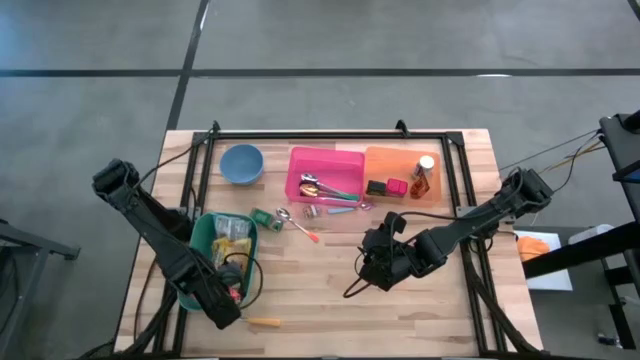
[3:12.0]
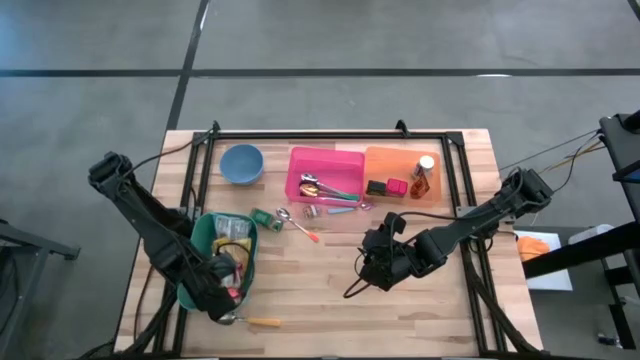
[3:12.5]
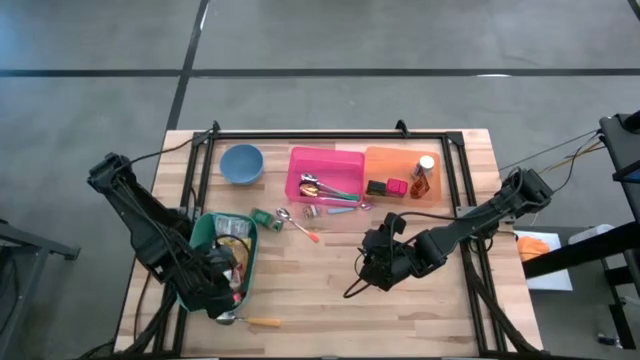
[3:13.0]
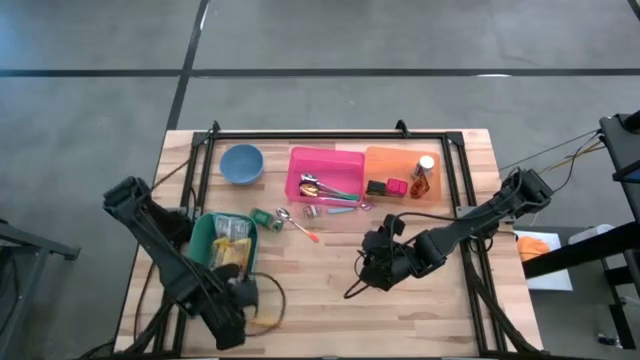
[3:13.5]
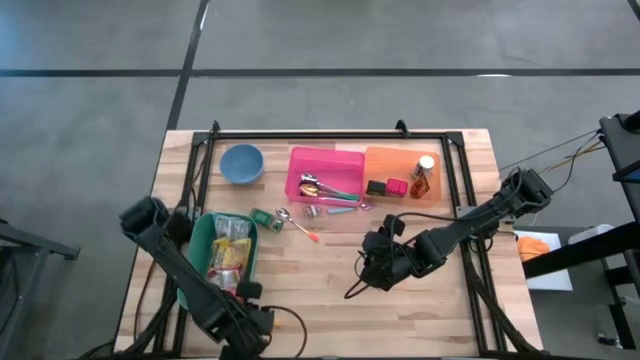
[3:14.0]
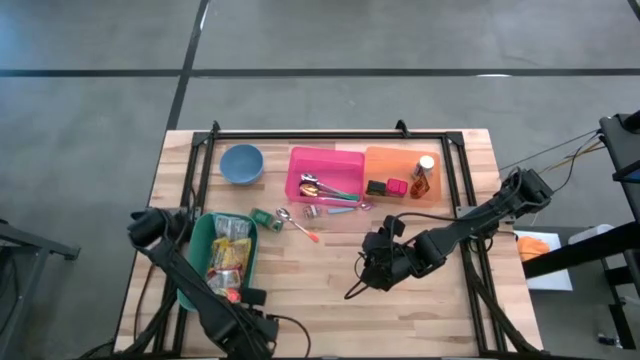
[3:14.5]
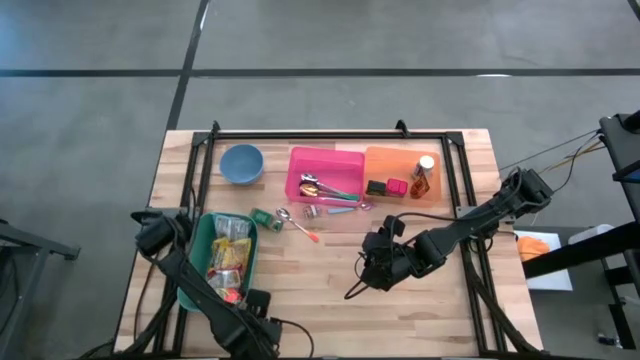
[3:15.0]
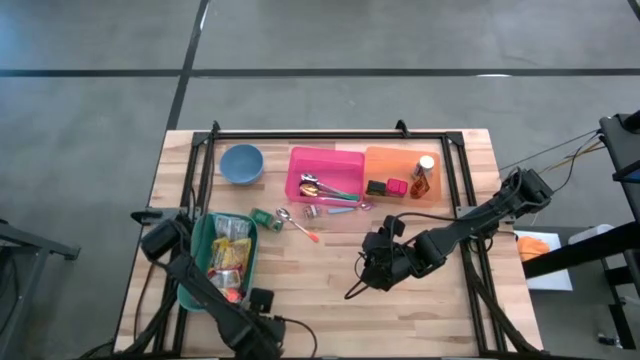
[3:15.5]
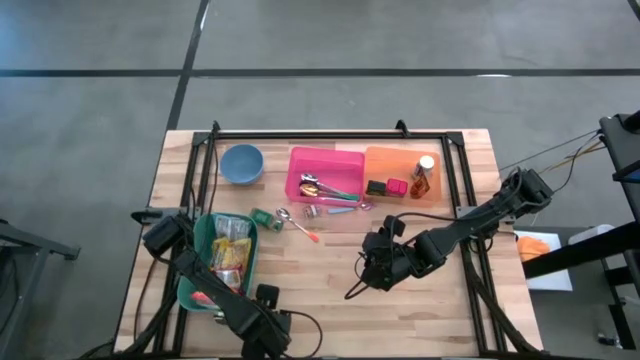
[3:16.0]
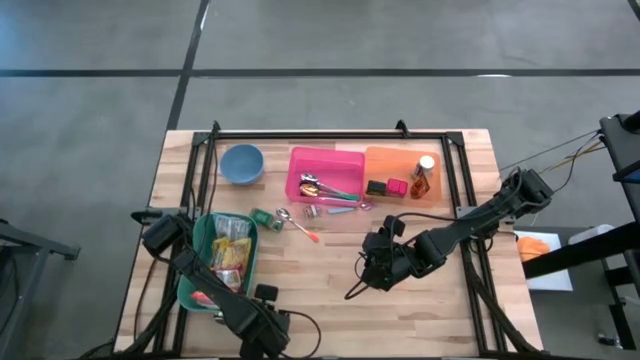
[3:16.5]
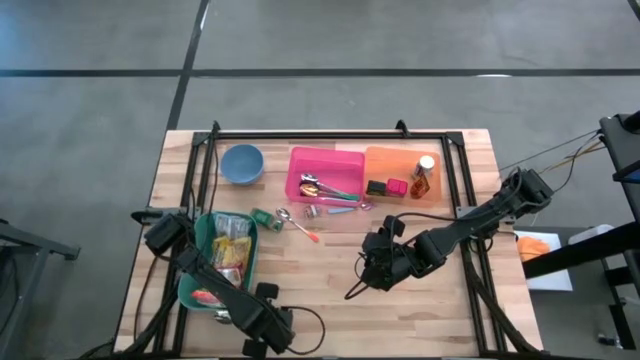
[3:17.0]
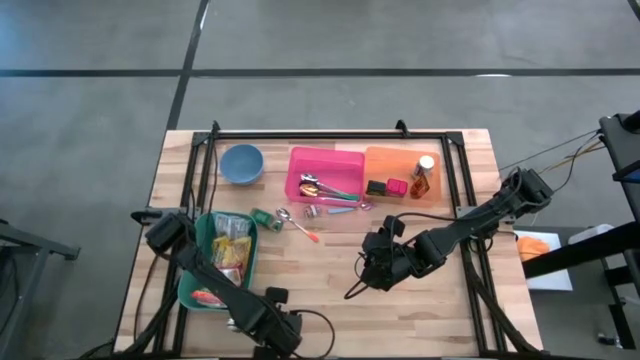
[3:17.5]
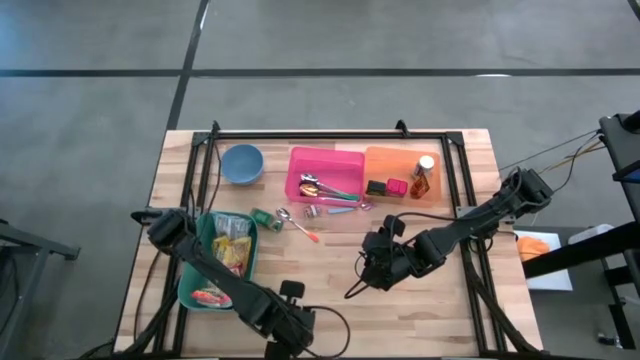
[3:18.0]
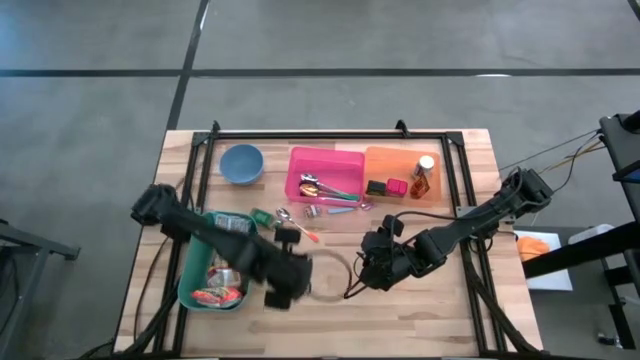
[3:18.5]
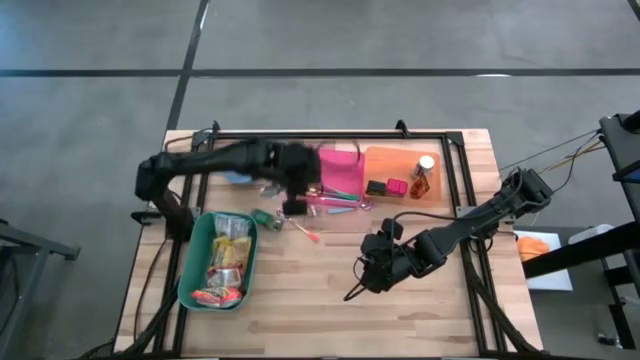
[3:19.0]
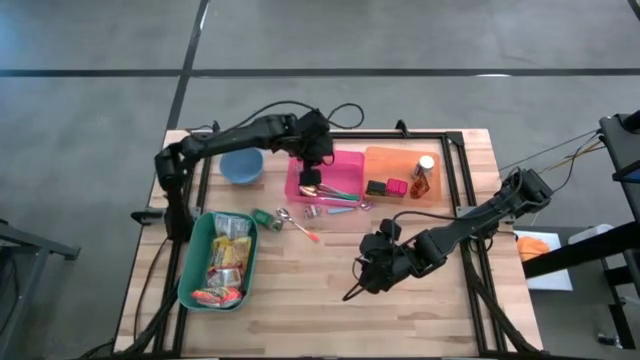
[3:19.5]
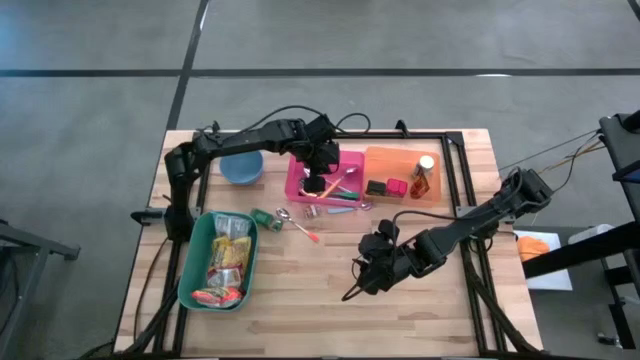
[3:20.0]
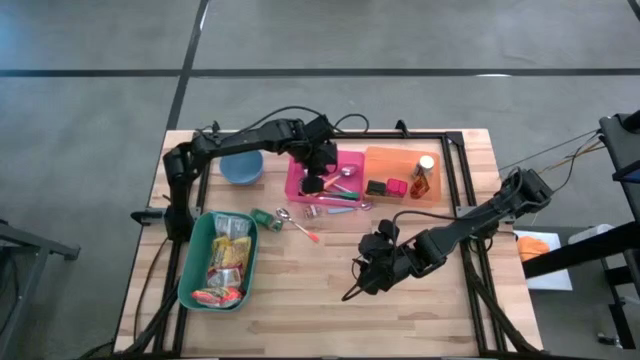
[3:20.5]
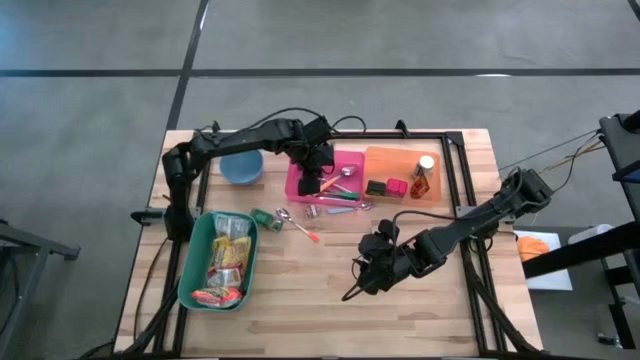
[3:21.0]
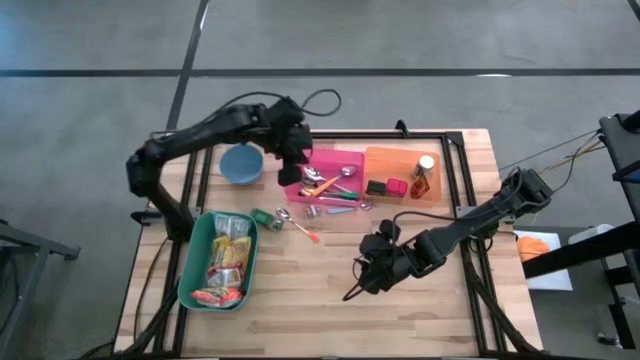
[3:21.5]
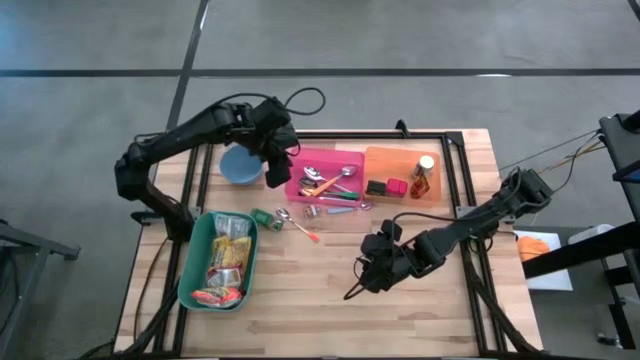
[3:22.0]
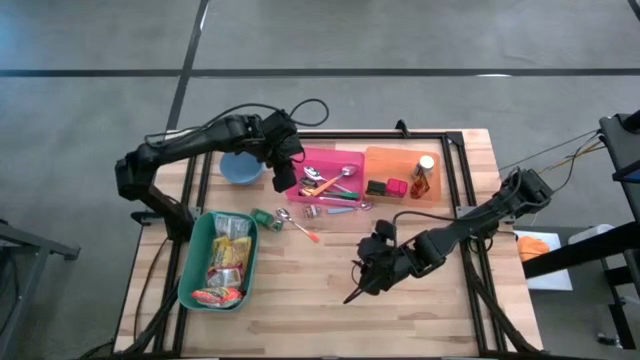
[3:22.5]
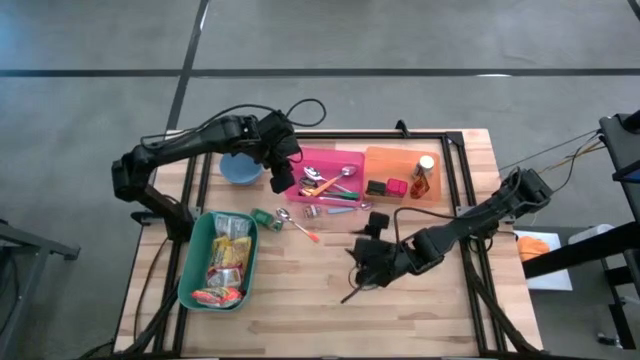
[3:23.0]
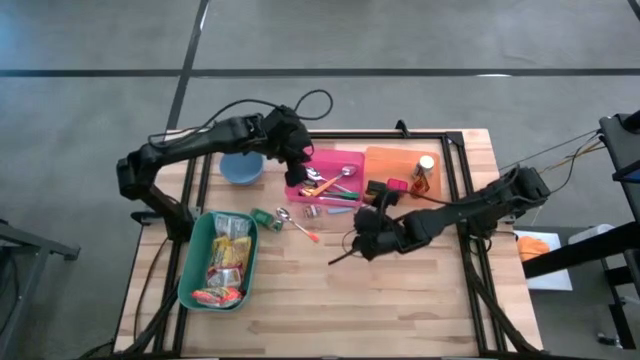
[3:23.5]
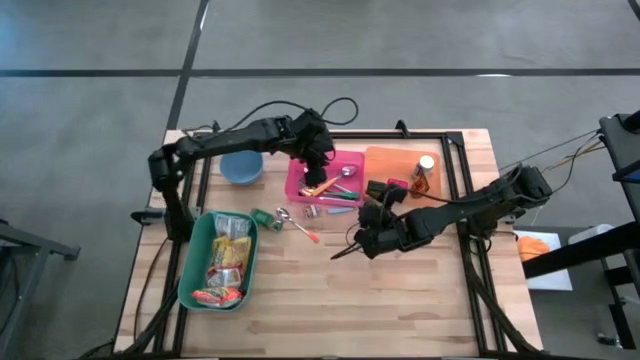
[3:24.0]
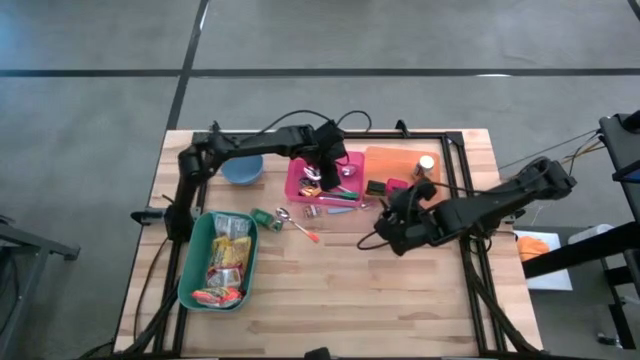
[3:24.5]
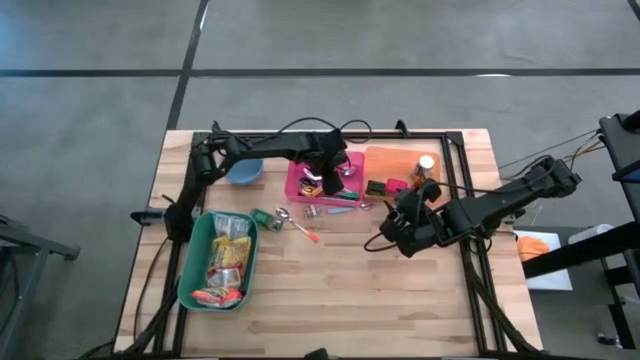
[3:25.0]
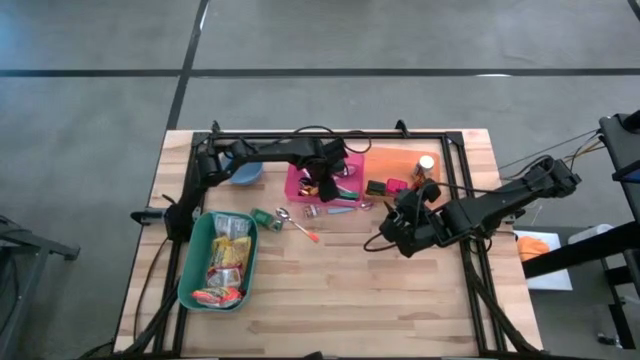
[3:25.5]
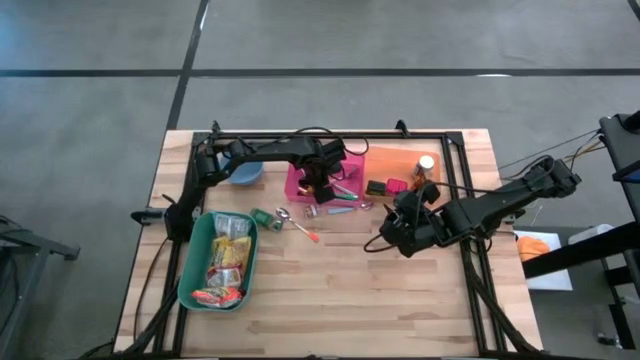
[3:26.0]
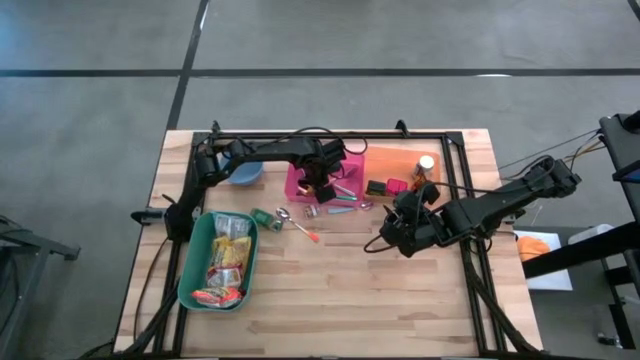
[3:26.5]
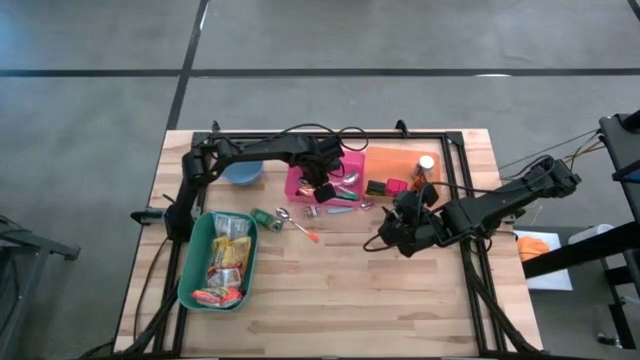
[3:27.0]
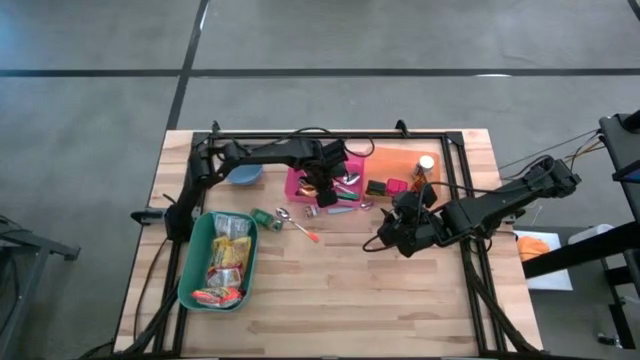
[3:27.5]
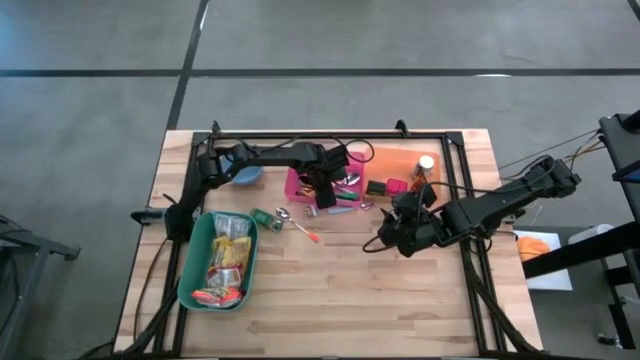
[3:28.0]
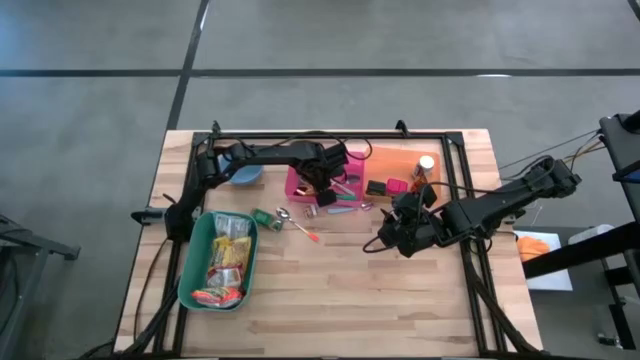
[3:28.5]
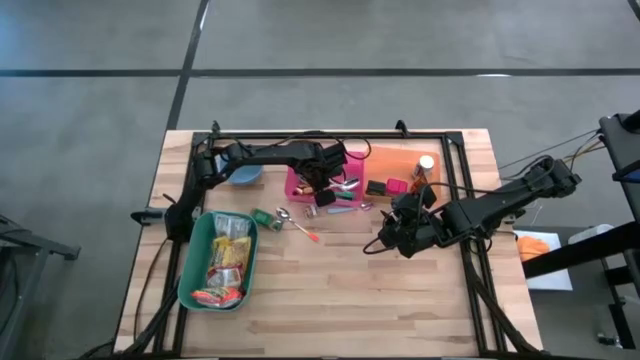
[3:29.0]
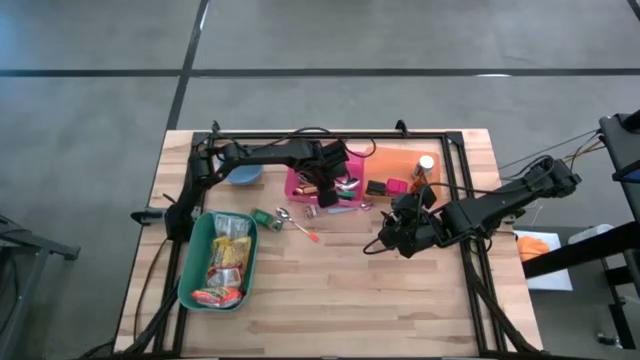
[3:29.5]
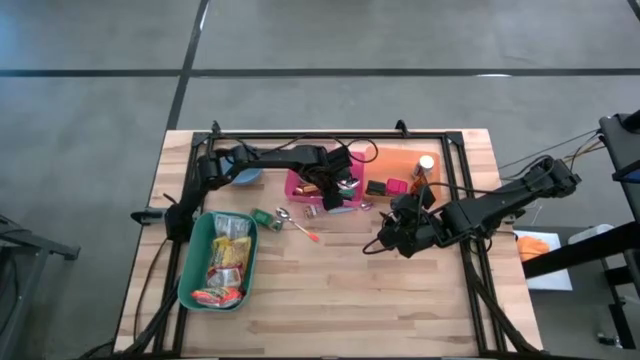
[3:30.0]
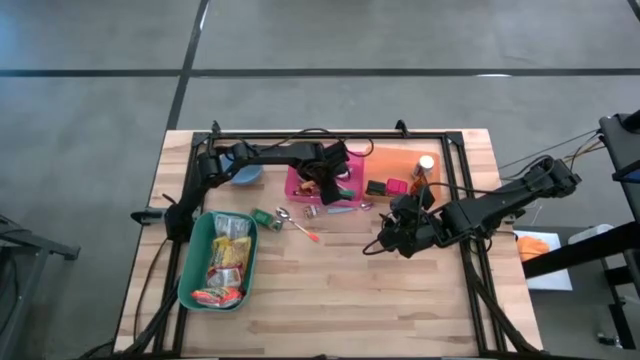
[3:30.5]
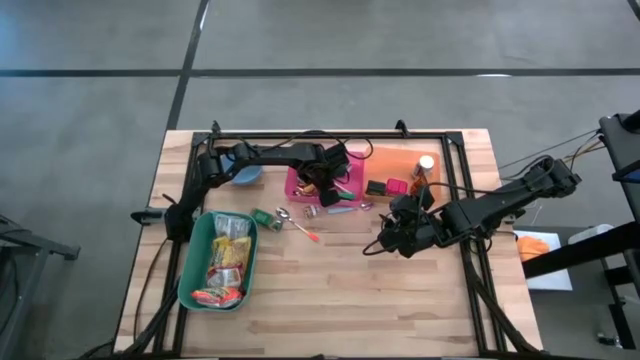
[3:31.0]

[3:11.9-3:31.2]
Put the yellow spoon into the pink bin
